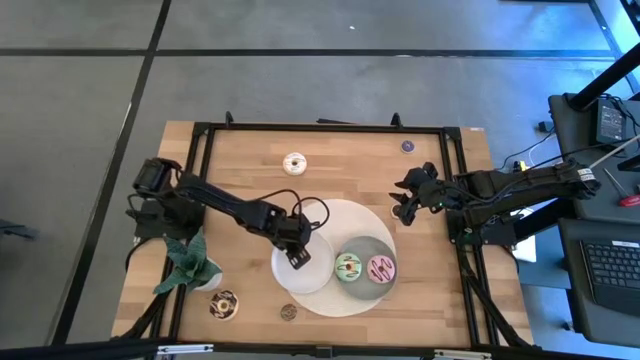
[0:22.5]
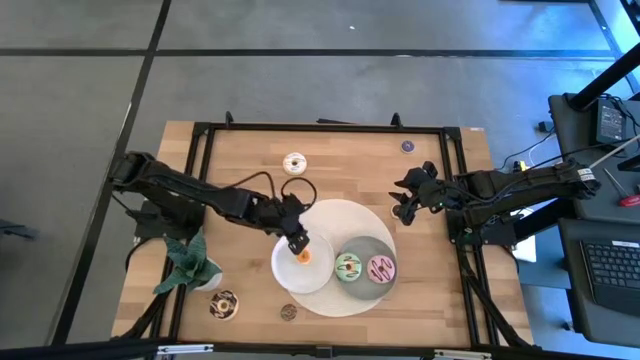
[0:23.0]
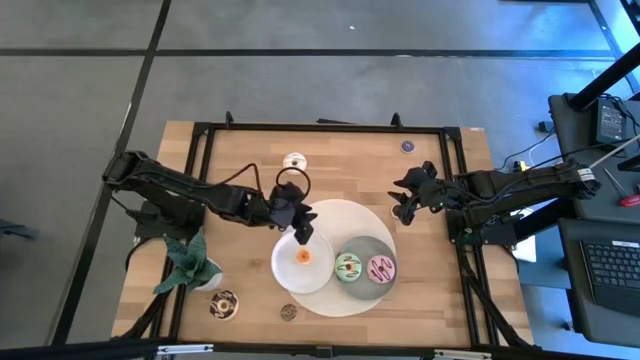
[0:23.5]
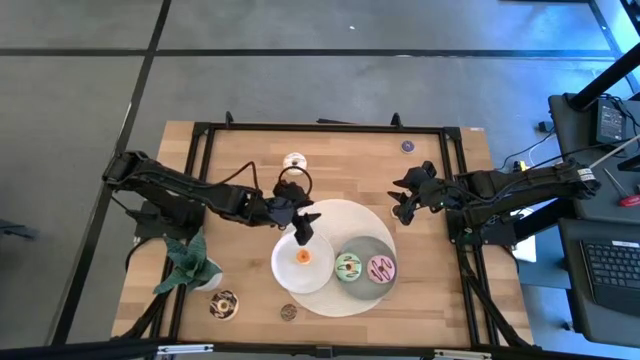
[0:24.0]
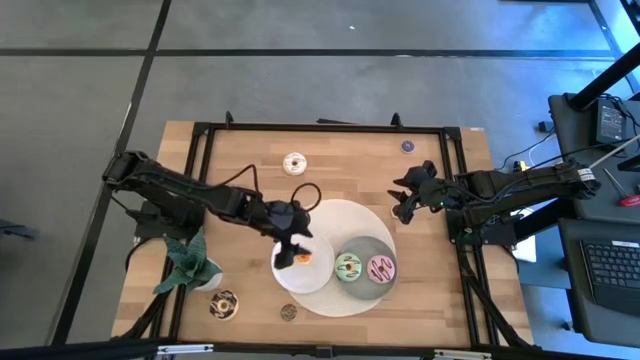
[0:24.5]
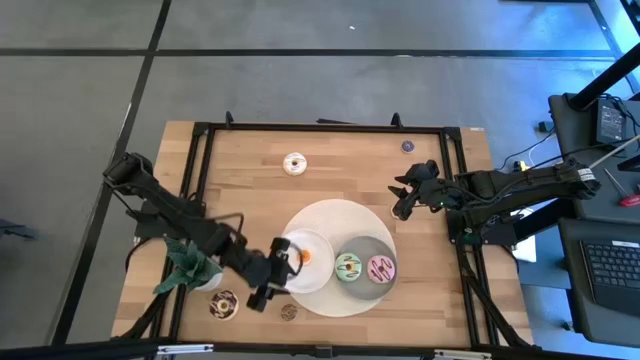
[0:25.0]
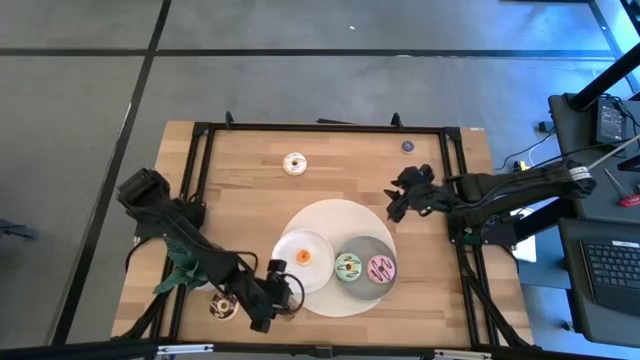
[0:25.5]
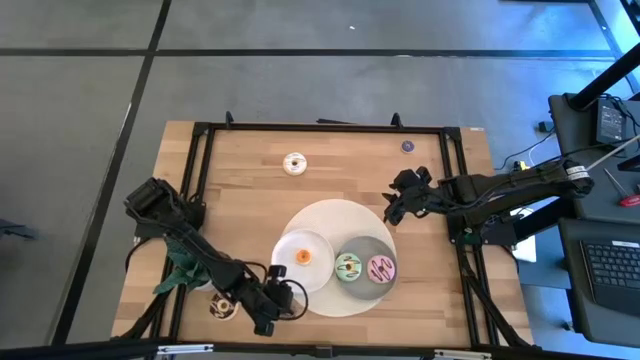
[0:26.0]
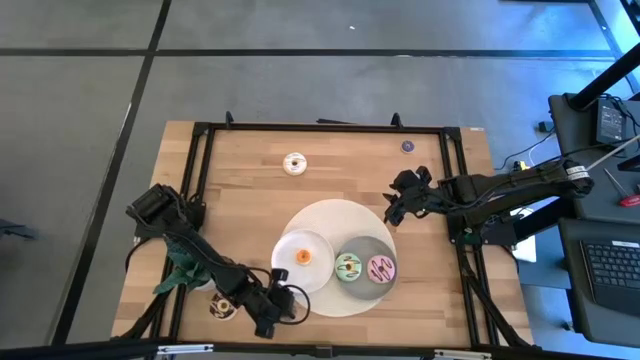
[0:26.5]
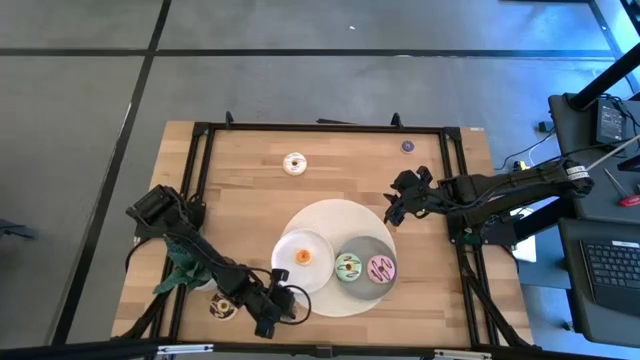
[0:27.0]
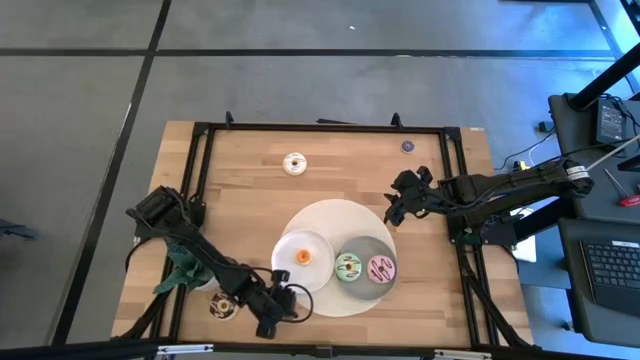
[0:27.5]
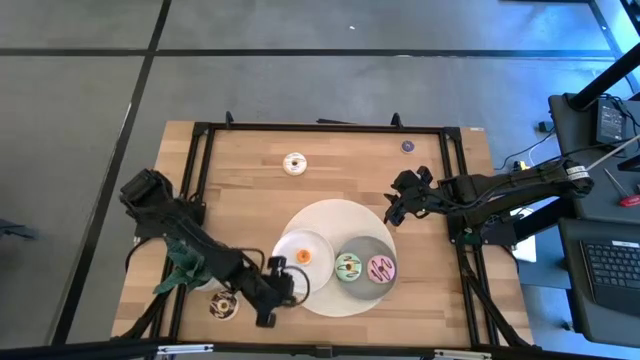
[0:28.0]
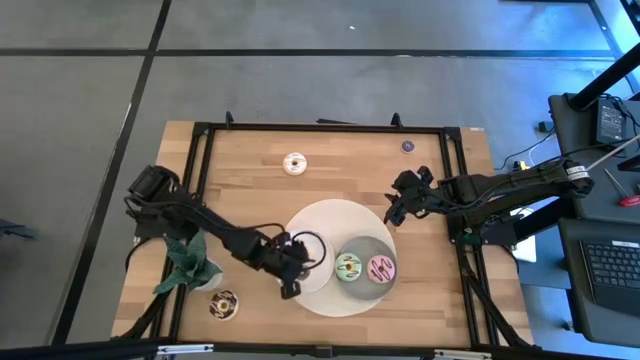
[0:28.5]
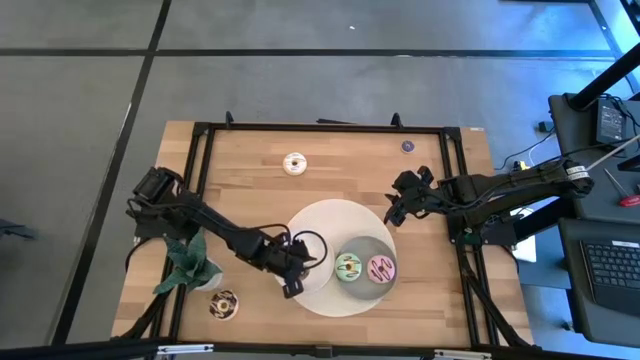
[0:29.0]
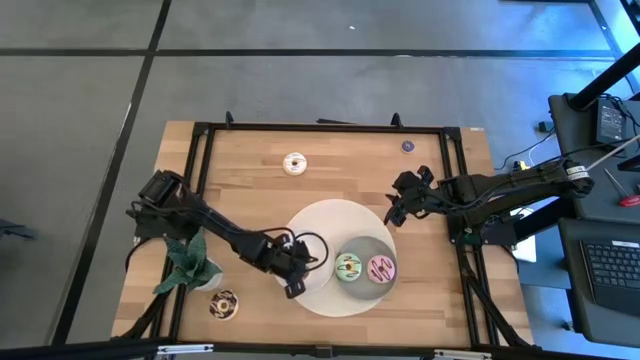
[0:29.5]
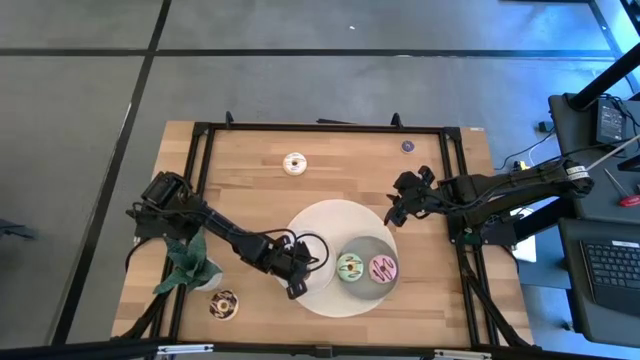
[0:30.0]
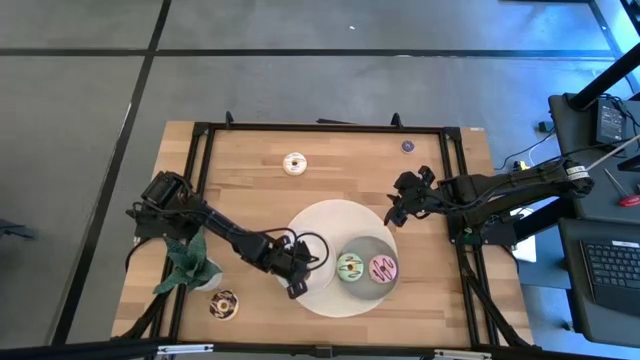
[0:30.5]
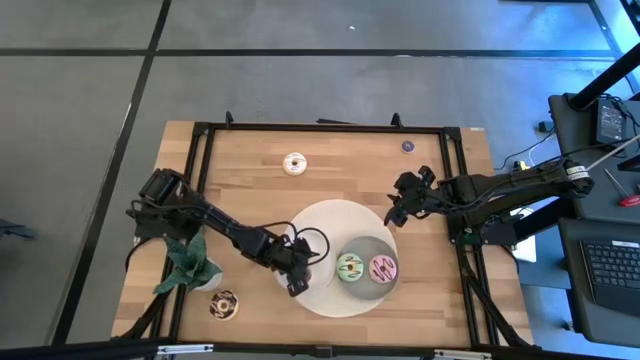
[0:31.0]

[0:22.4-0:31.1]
Task: Pick & Place donuts
Put the small brown donut on the white plate

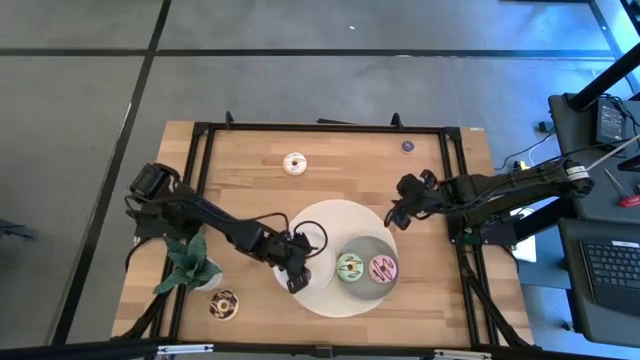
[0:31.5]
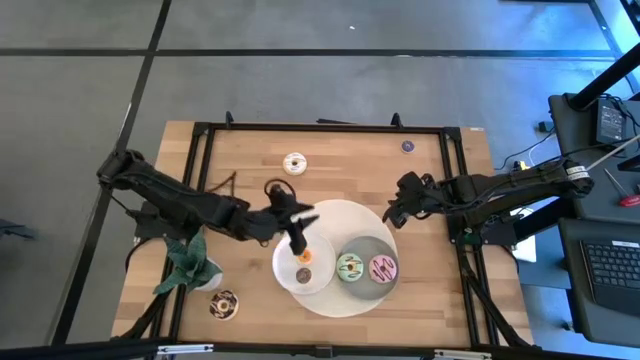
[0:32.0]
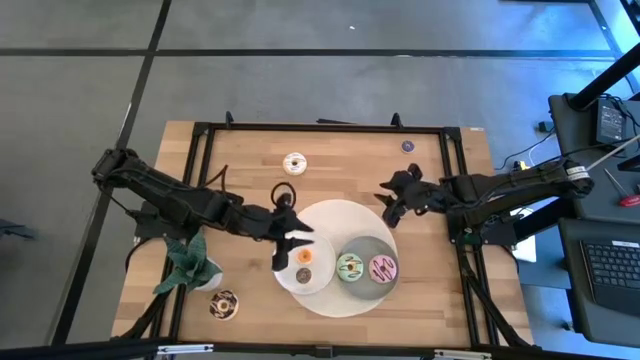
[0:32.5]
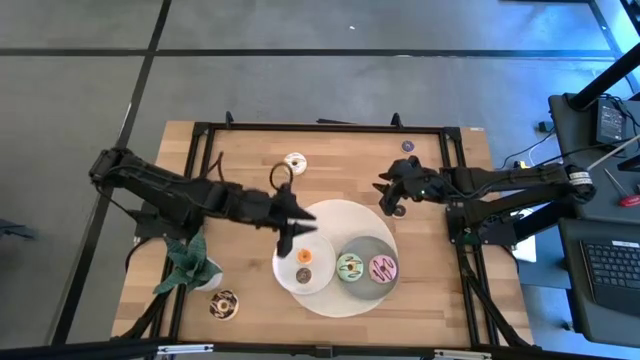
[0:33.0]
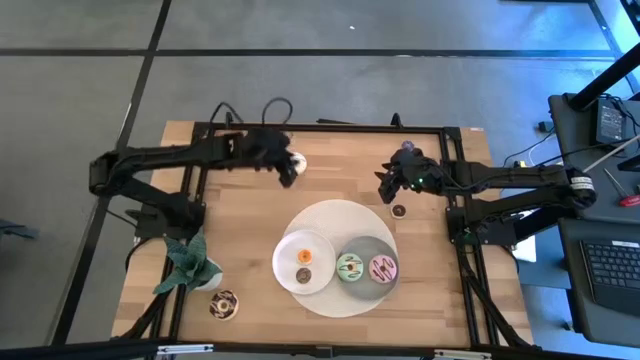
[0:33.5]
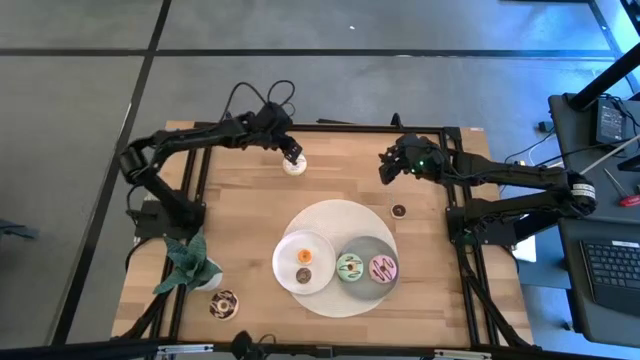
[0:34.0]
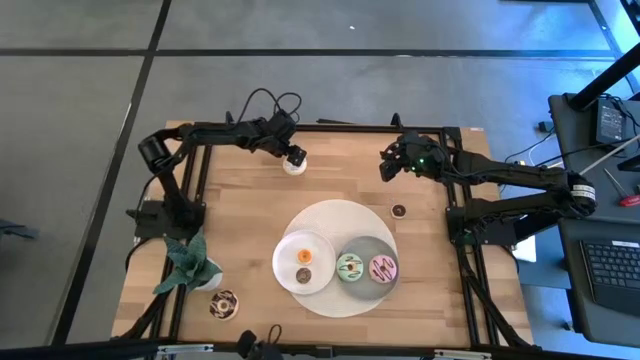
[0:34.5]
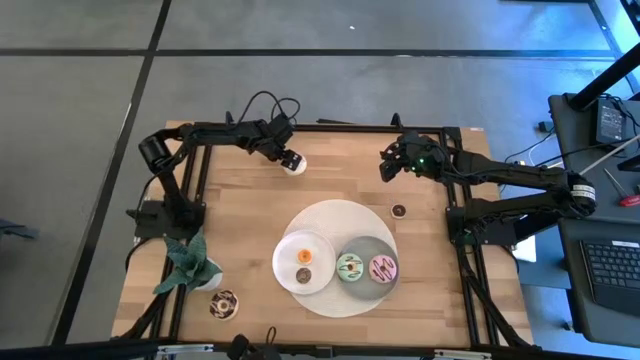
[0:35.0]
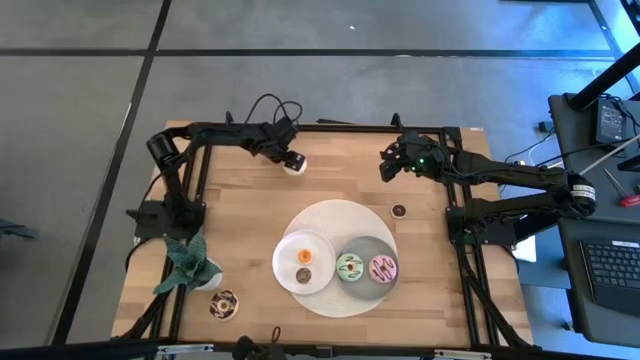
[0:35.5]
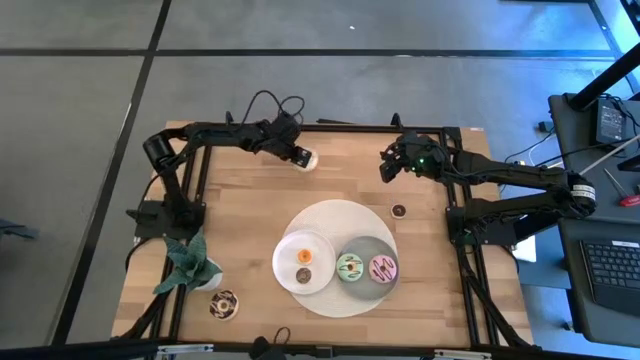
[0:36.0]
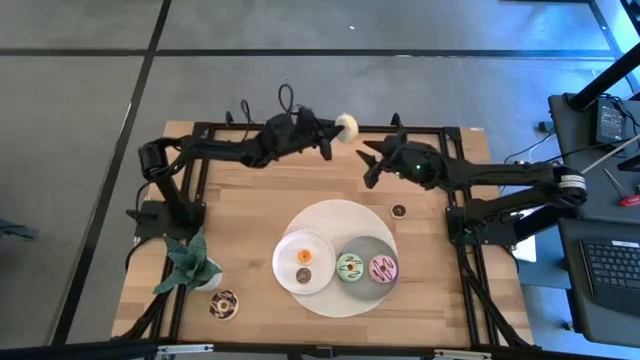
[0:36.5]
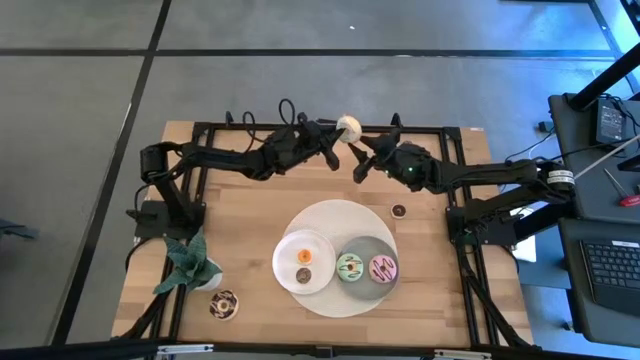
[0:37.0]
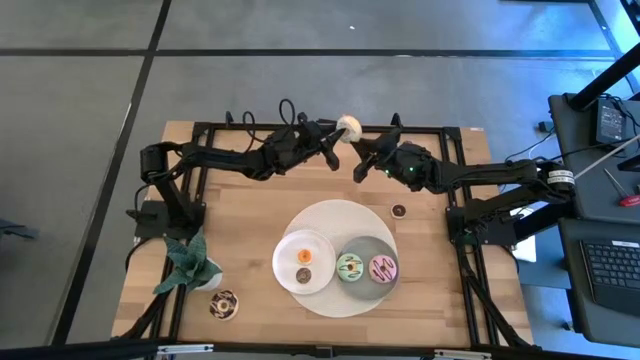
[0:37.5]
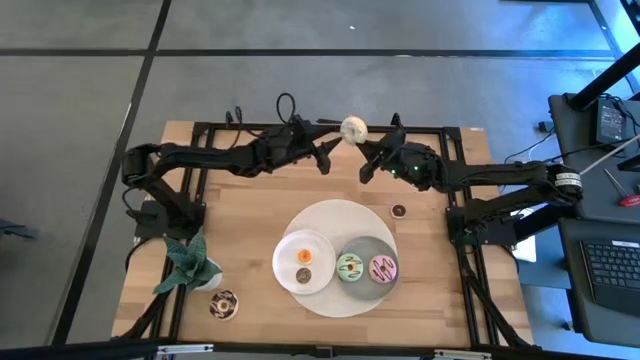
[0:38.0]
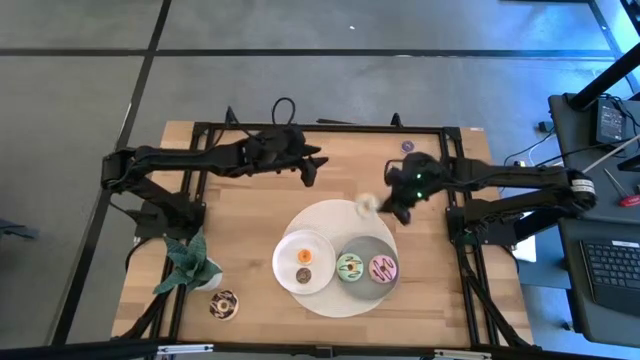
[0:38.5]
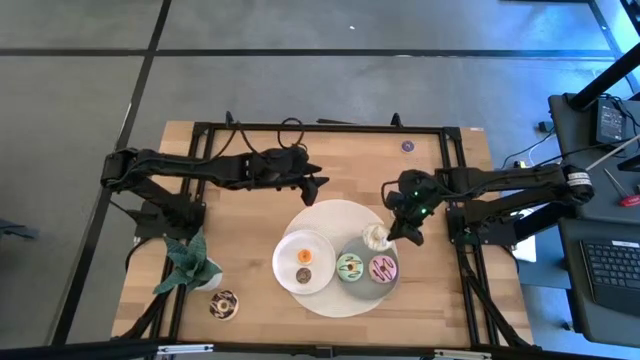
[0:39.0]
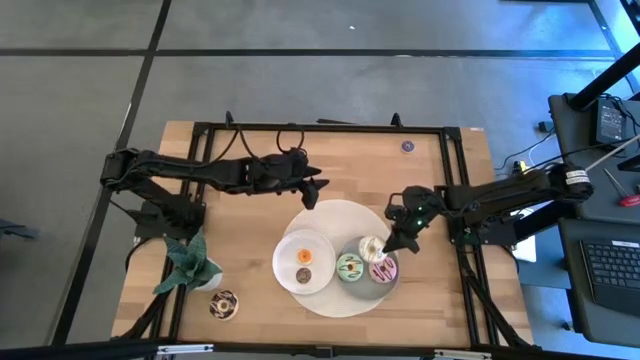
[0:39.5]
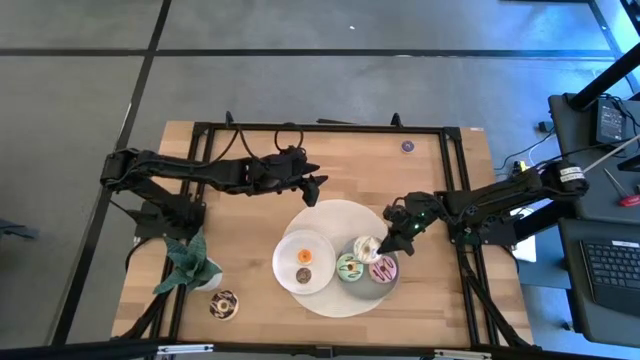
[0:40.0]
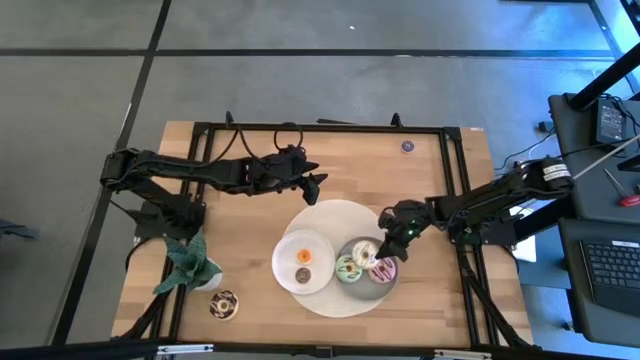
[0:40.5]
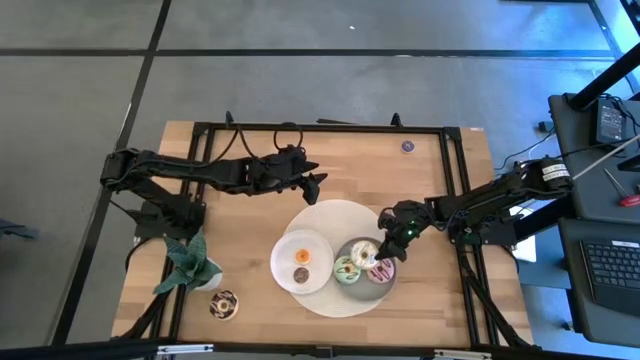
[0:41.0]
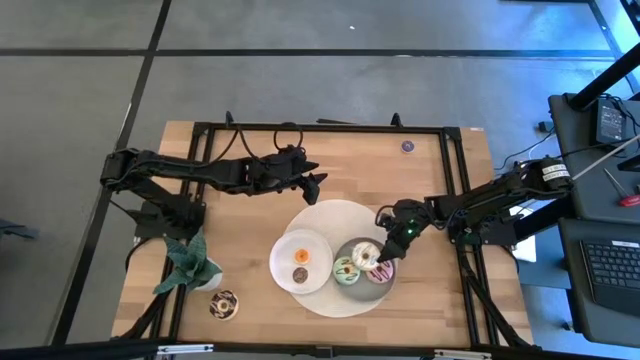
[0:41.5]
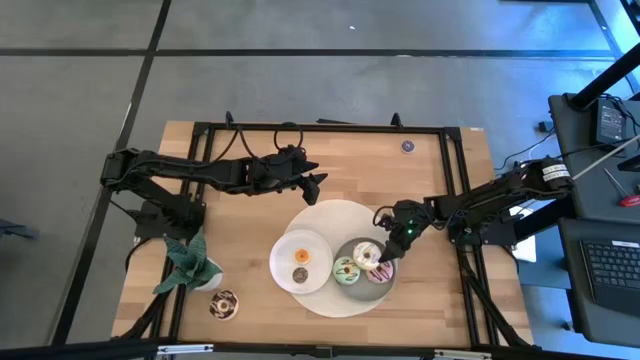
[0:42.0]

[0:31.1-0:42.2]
Put the large white donut on the gray plate

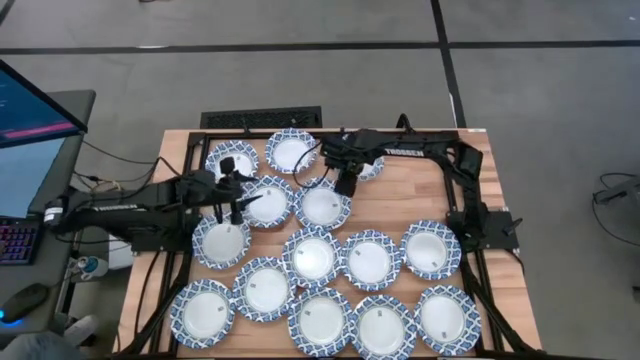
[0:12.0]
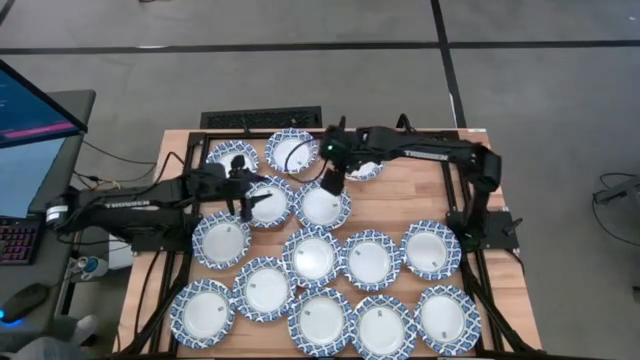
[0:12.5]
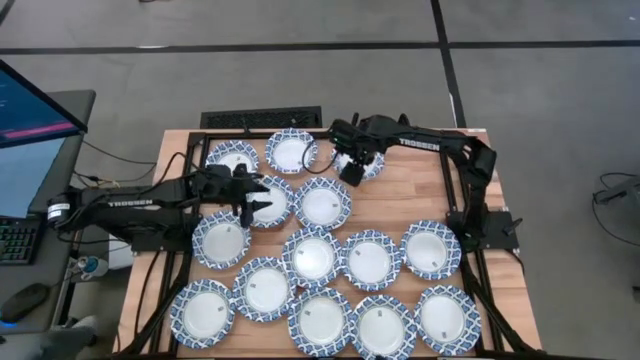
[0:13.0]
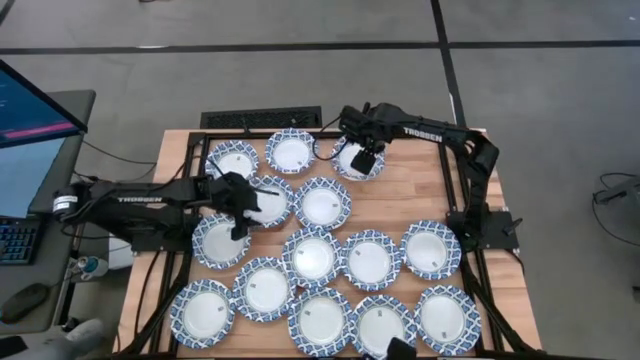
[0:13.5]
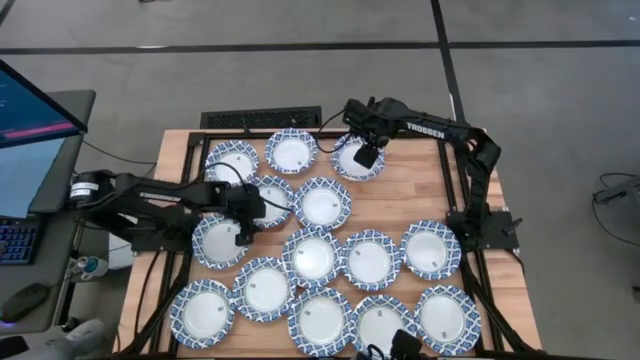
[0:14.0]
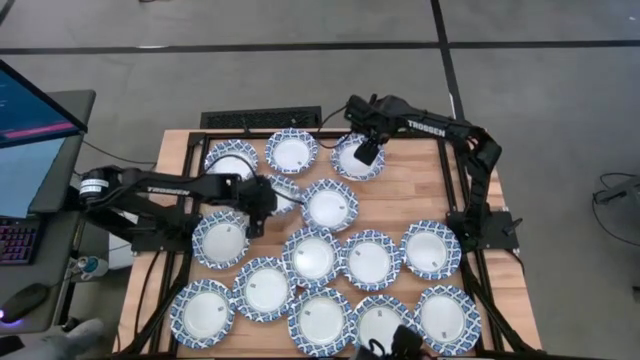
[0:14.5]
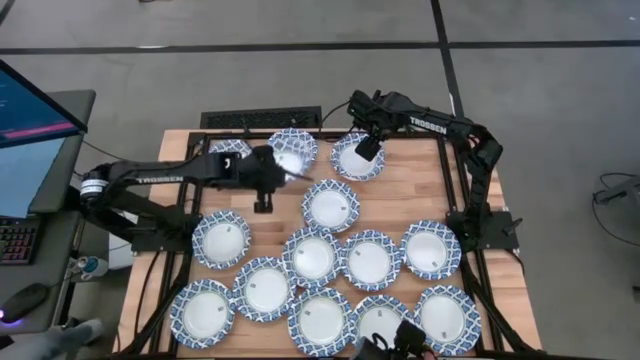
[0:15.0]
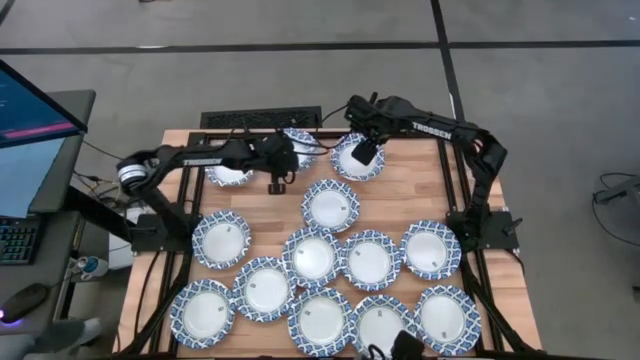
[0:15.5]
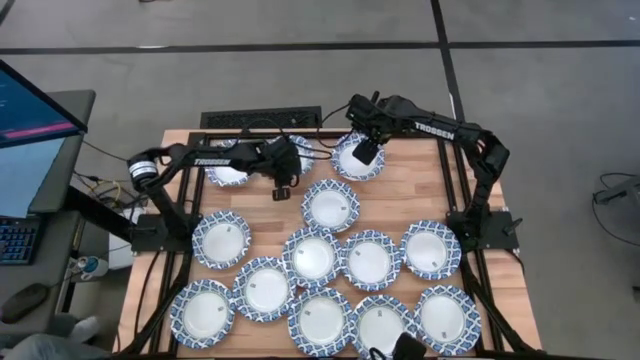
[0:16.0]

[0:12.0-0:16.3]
Task: Nest bowls inside each other
Stack the white bowl on the white bowl
